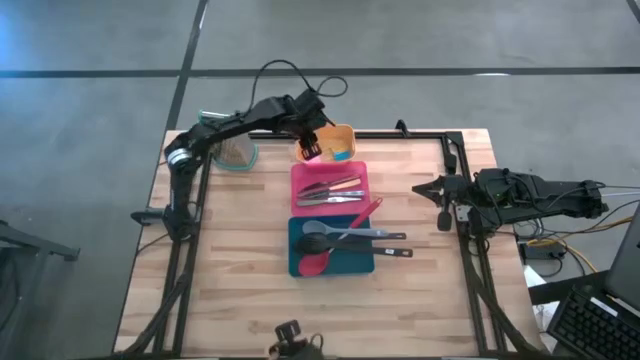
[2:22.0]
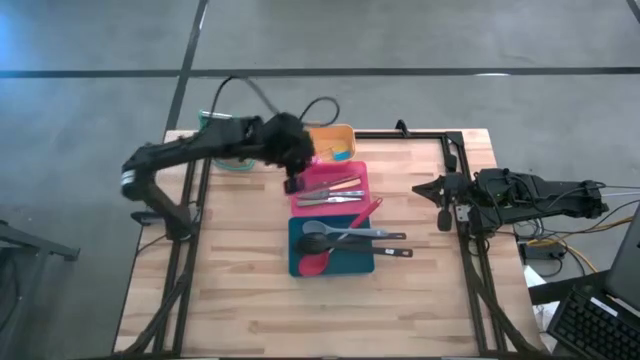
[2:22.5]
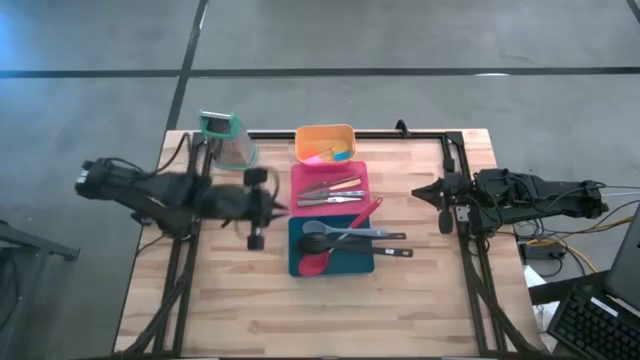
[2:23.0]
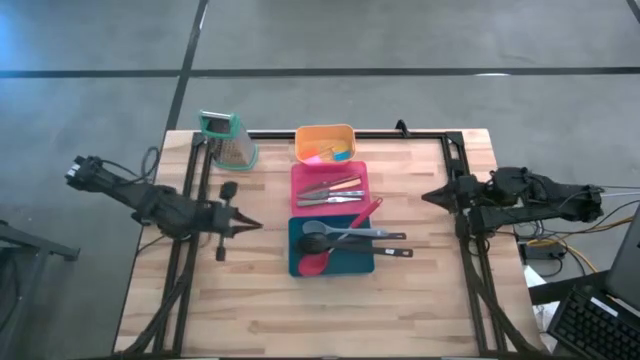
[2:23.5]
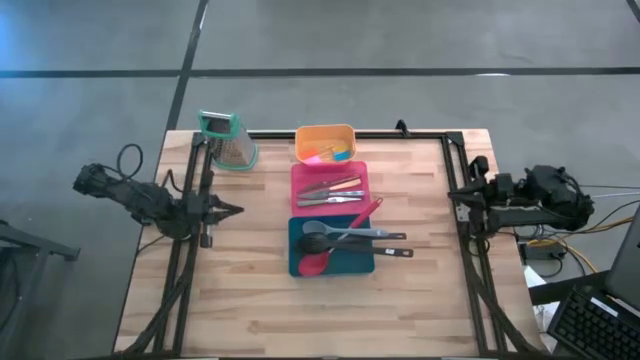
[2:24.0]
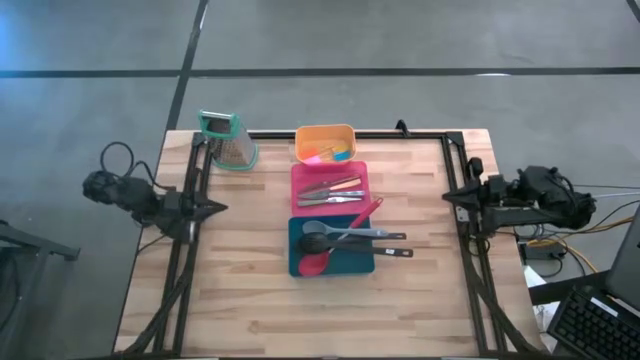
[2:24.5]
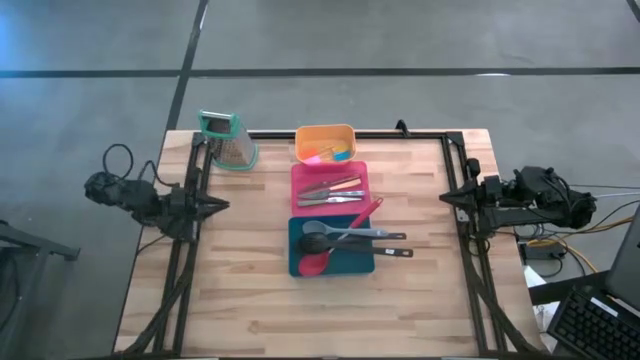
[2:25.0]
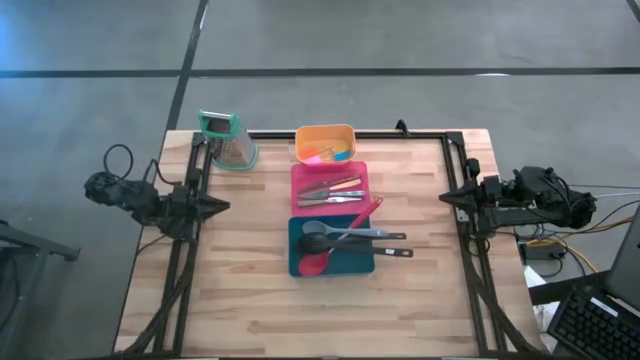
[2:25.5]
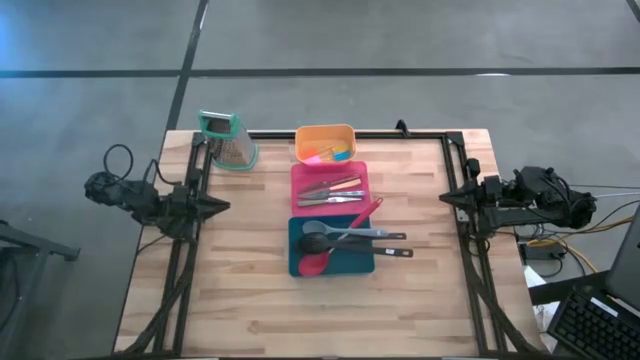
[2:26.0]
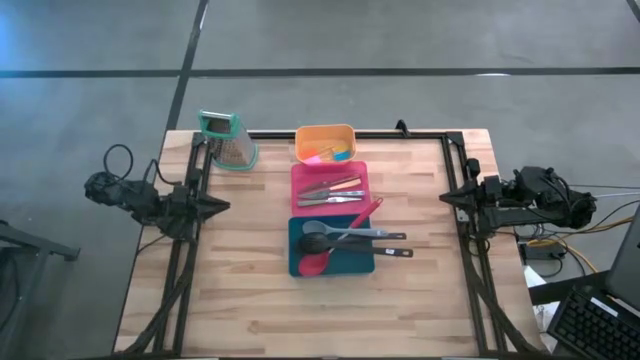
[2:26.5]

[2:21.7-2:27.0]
Task: Pick & Place Kitchen Items
Return to Home Position

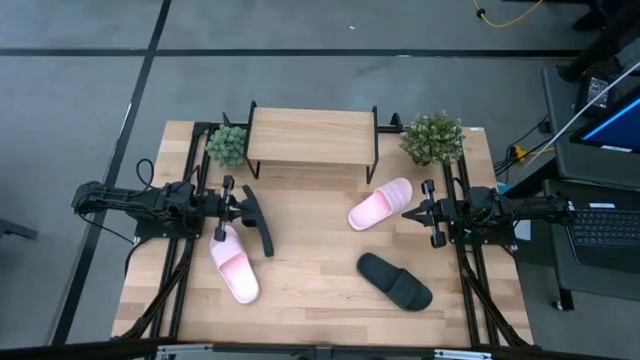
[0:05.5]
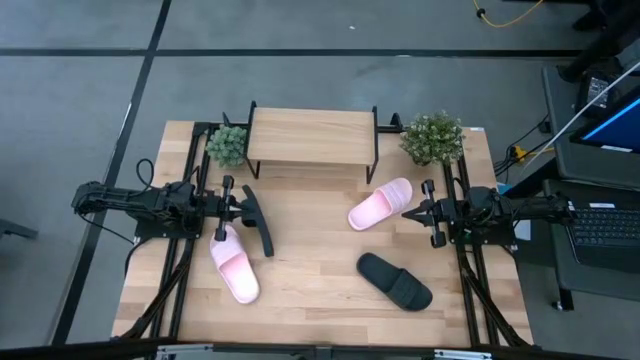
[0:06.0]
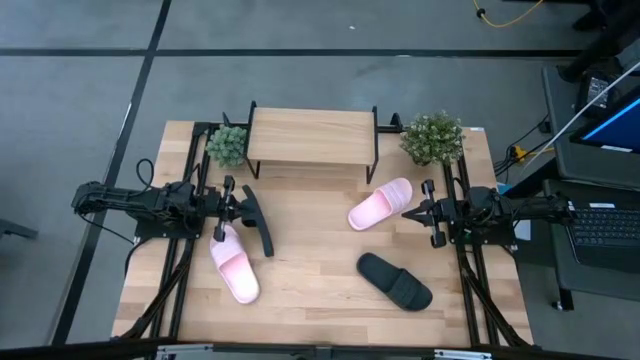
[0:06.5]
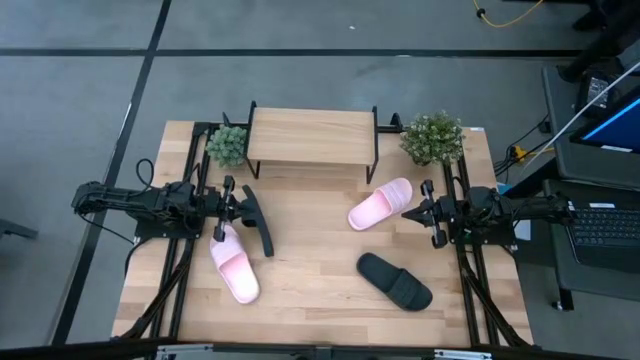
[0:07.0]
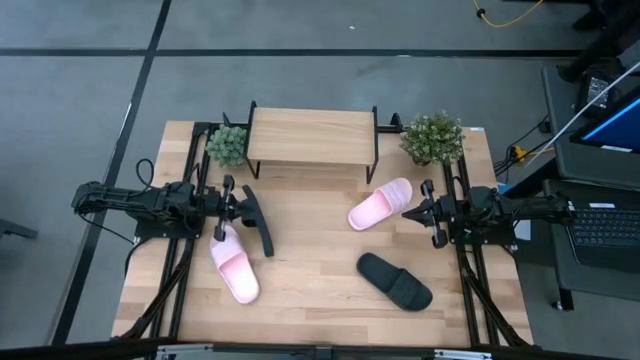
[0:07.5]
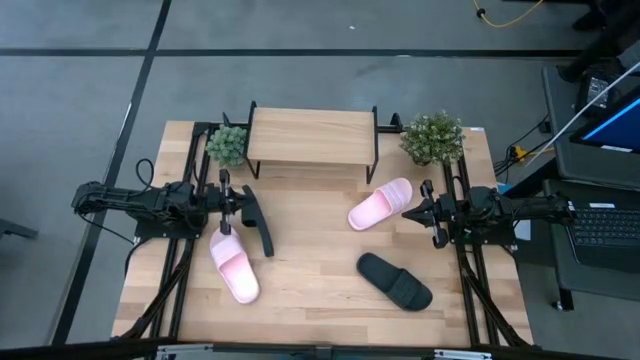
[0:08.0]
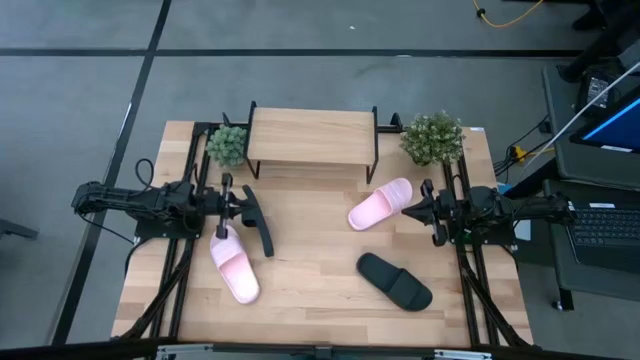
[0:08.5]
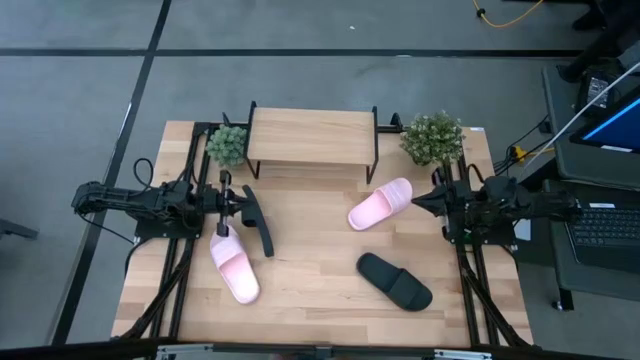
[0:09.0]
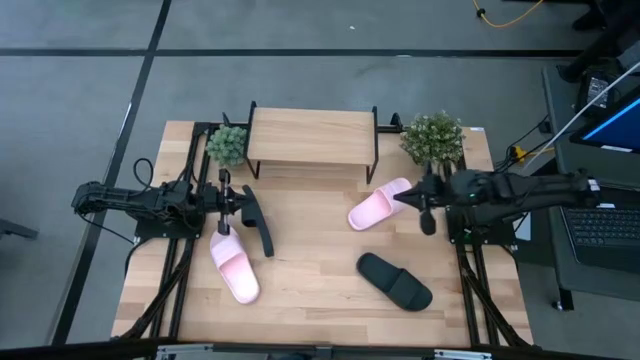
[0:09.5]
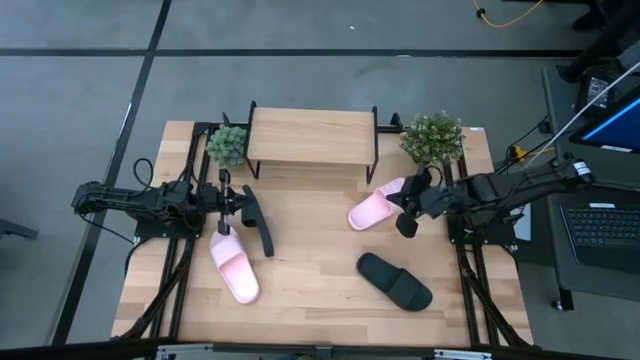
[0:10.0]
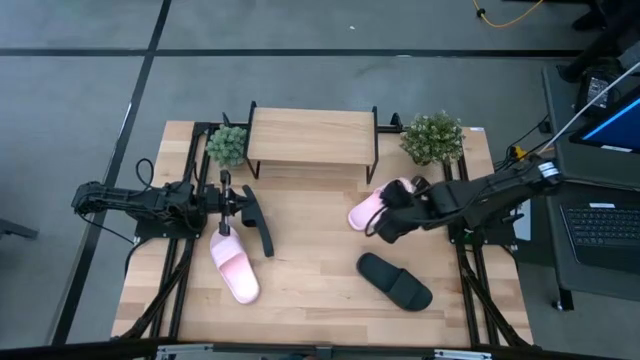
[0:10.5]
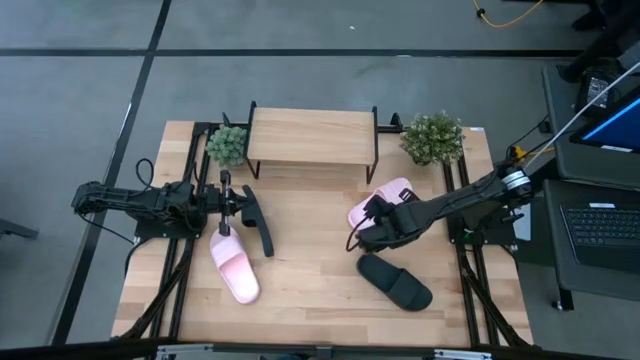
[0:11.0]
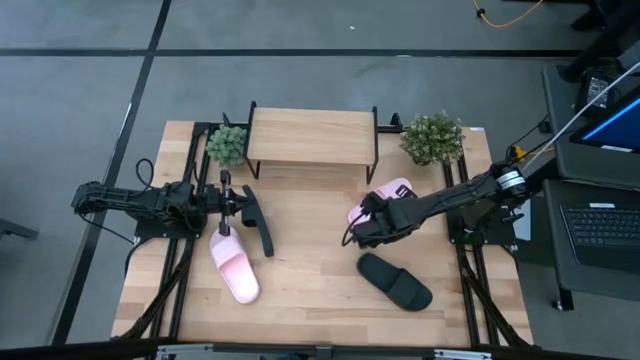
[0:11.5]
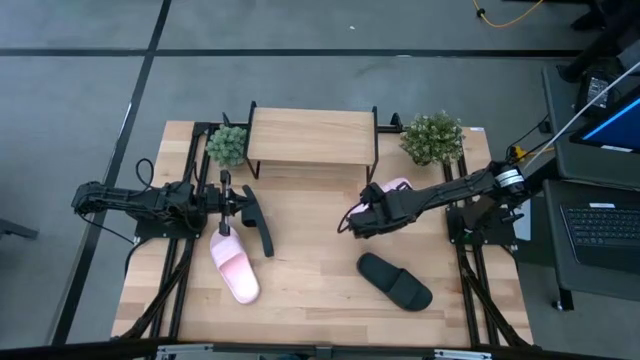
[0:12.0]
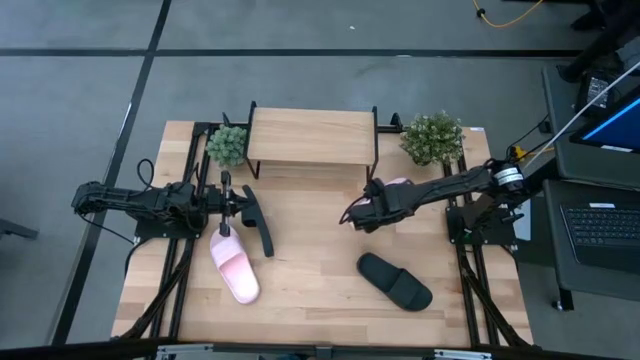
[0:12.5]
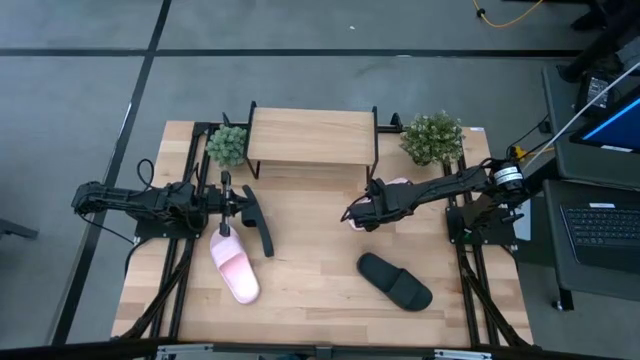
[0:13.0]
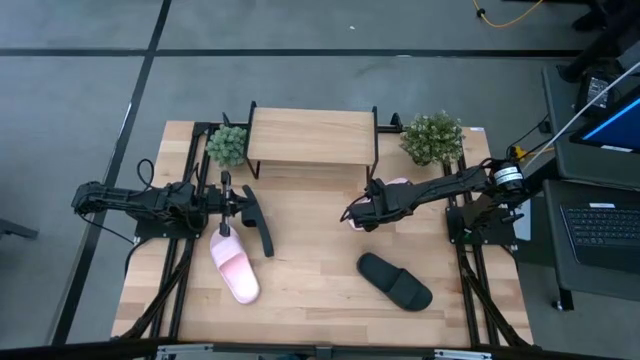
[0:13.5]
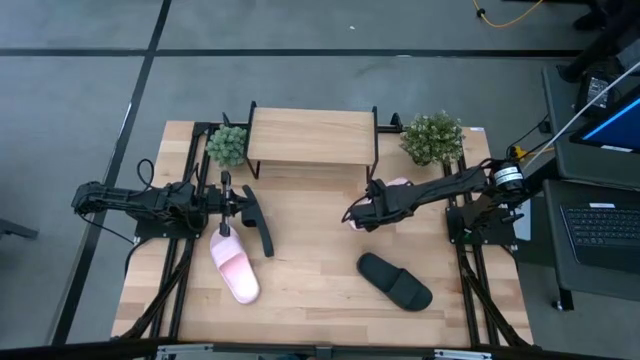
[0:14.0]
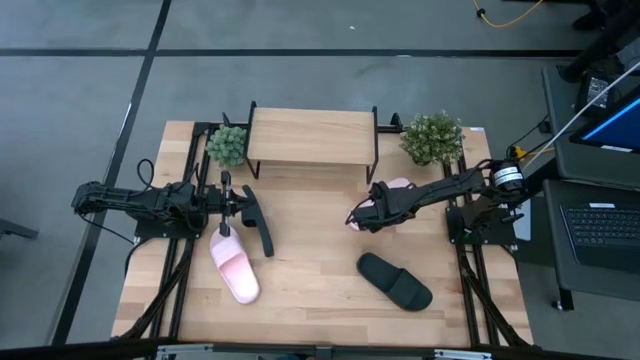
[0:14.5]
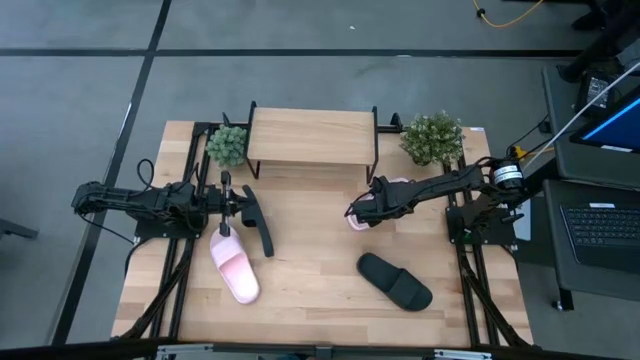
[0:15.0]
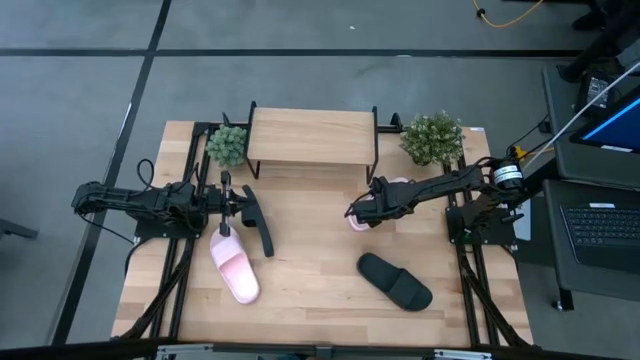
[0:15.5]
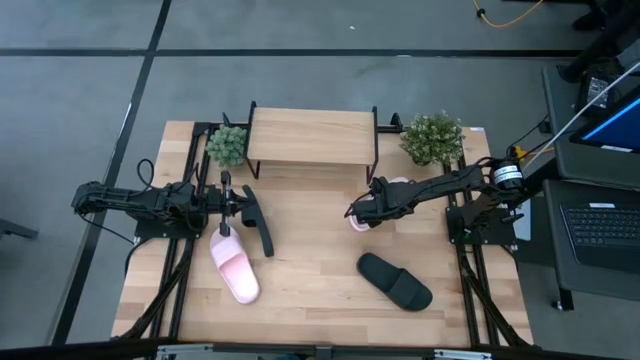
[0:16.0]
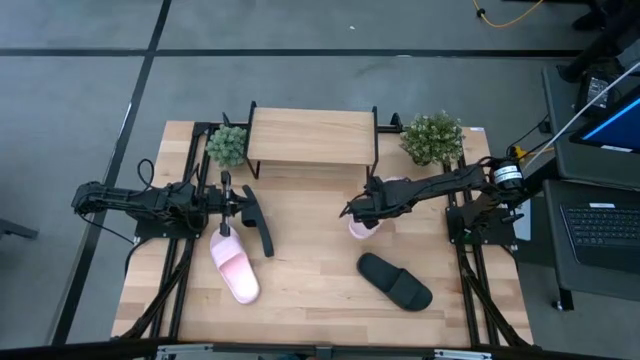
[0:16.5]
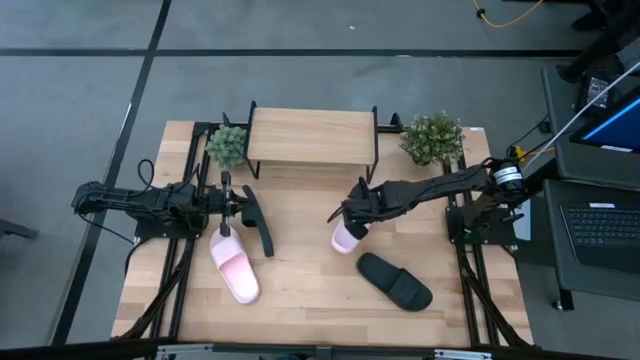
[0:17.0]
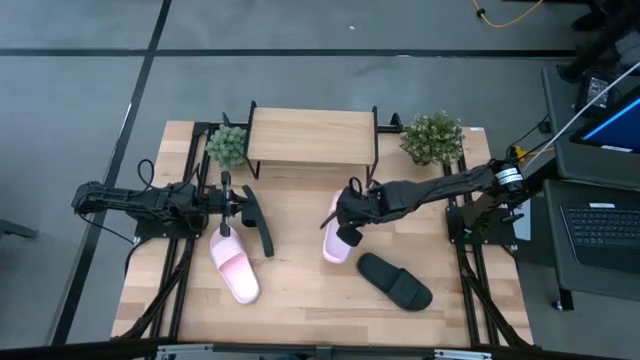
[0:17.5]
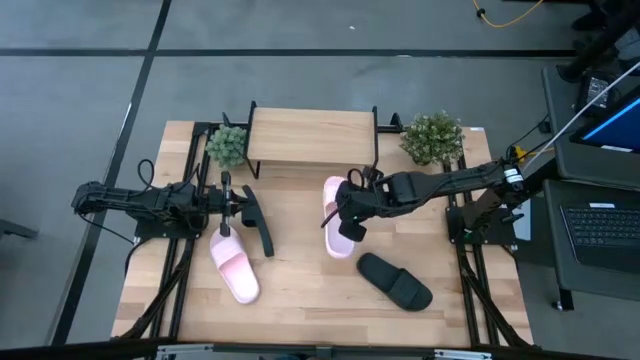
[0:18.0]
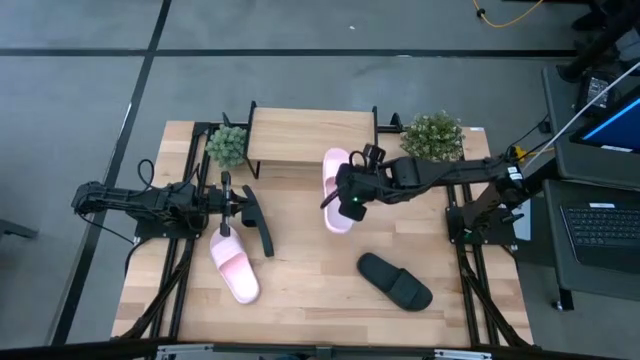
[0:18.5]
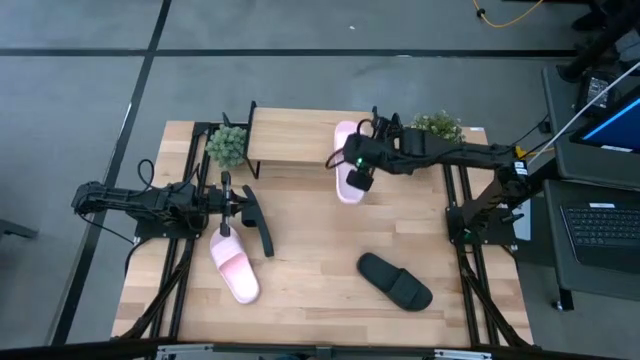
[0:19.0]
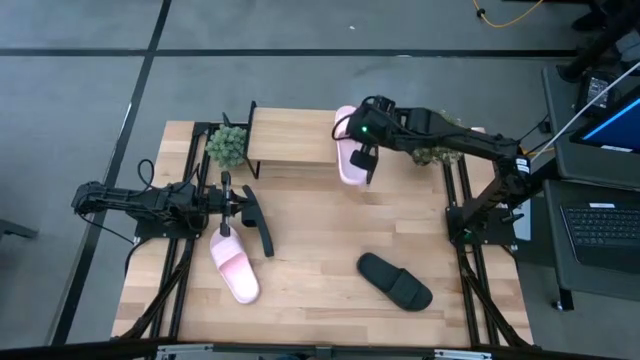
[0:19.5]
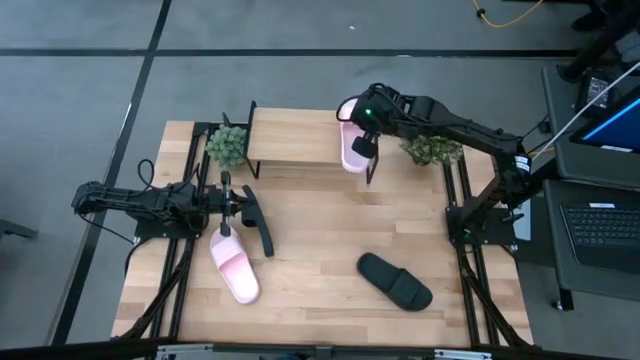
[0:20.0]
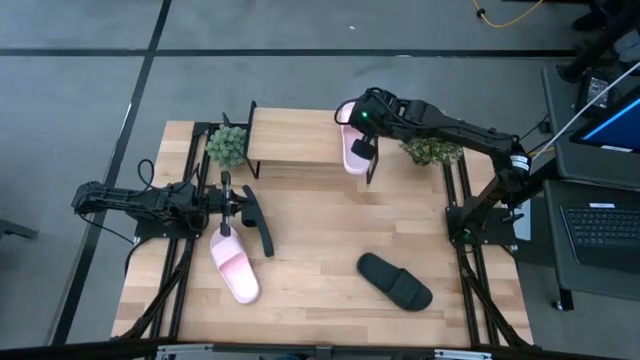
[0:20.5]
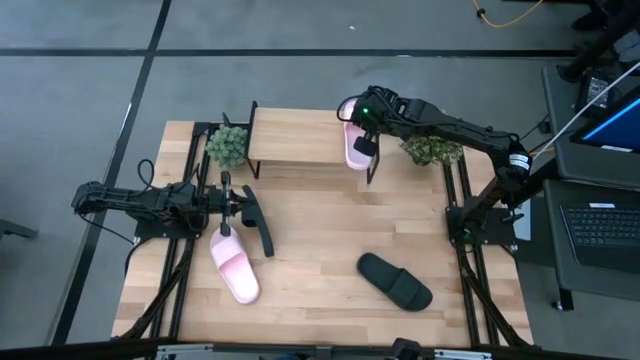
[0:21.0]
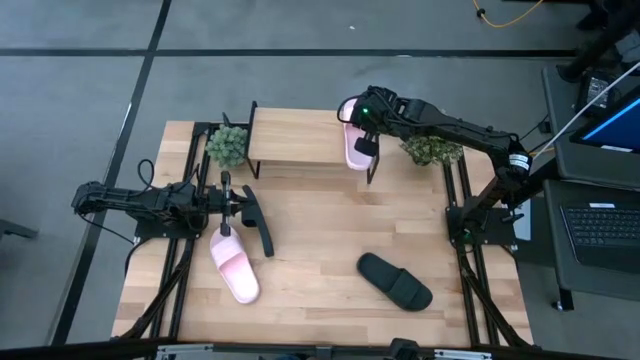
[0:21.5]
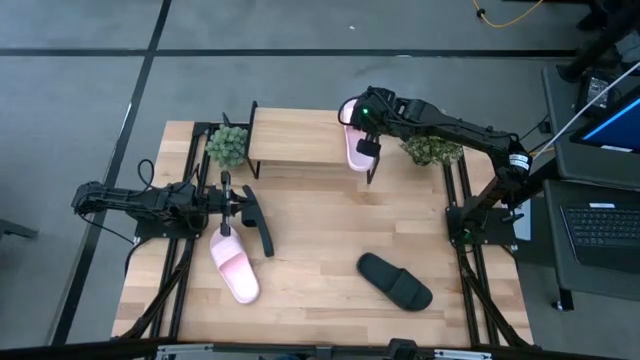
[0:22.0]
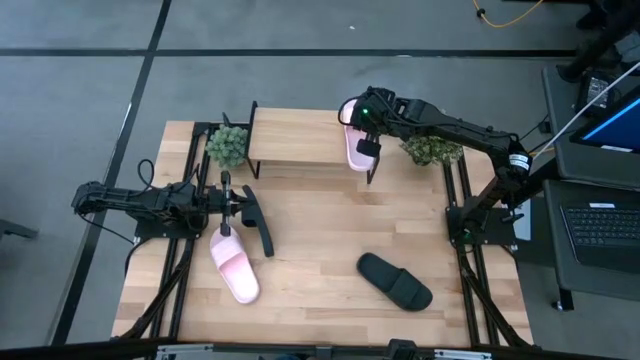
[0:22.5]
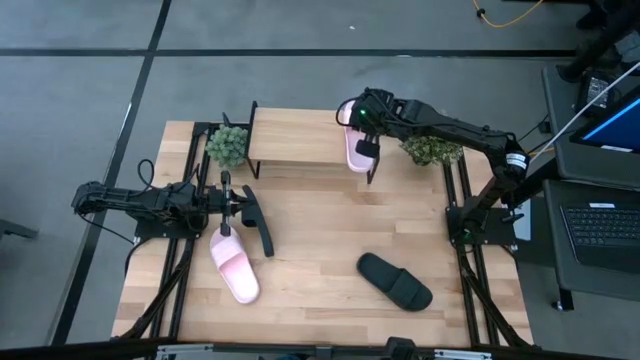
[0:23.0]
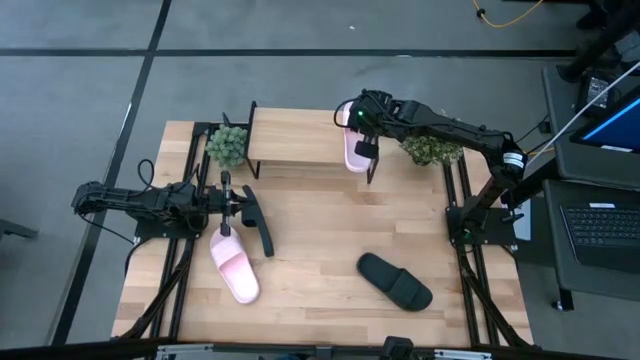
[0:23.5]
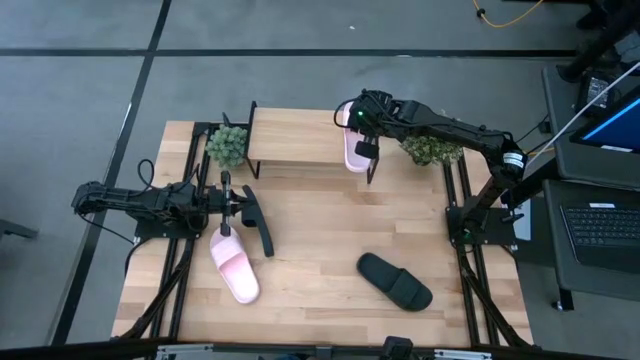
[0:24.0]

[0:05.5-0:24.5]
Task: Pick and place slides into the shelf
Put the right pink slipper on the shelf
